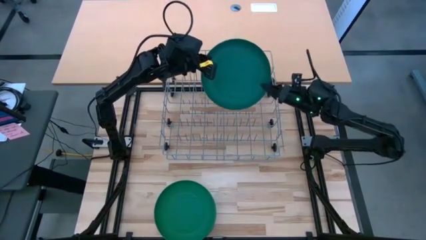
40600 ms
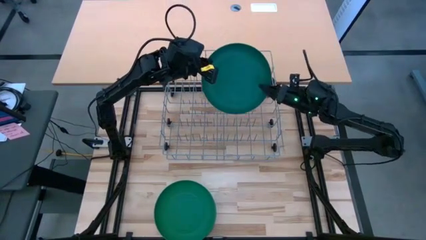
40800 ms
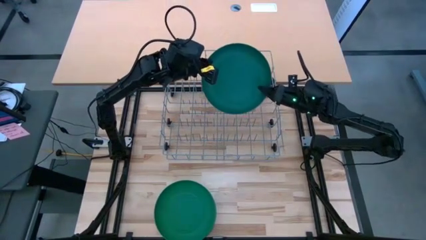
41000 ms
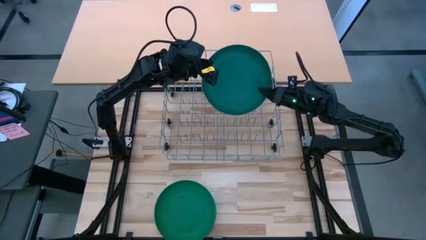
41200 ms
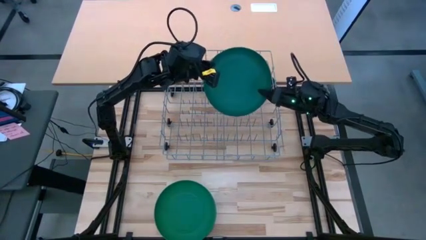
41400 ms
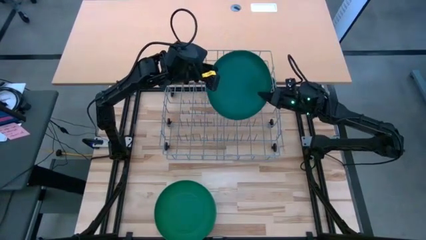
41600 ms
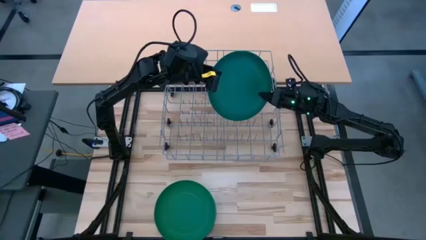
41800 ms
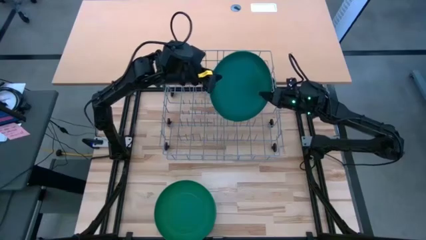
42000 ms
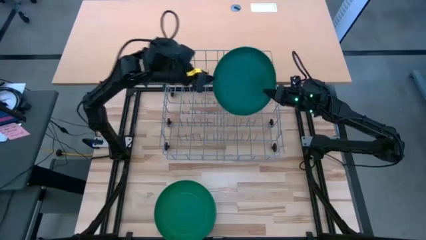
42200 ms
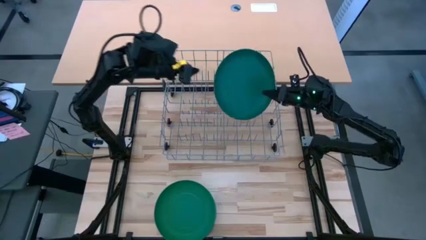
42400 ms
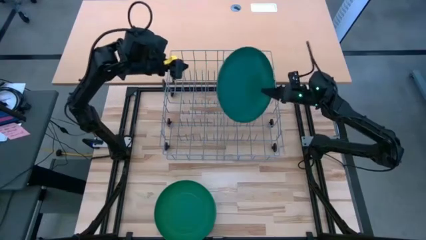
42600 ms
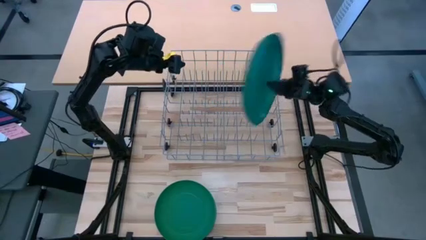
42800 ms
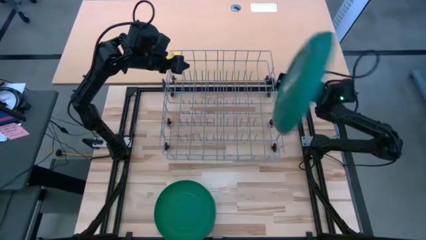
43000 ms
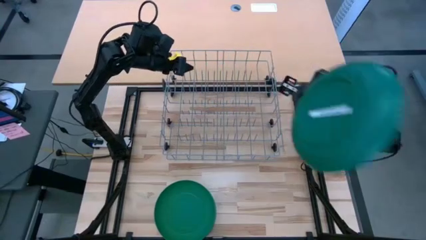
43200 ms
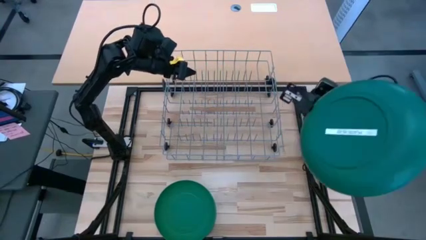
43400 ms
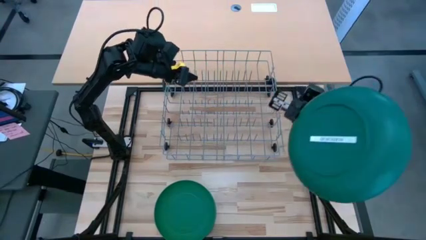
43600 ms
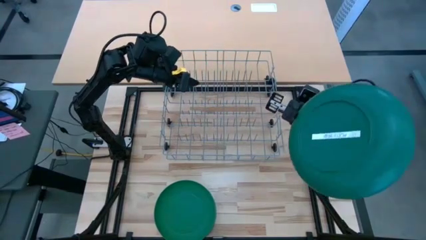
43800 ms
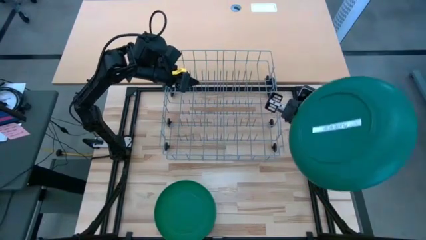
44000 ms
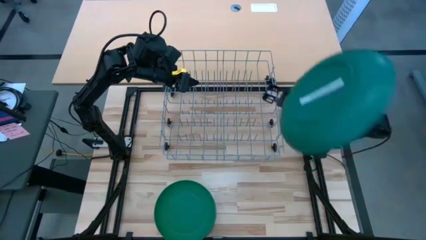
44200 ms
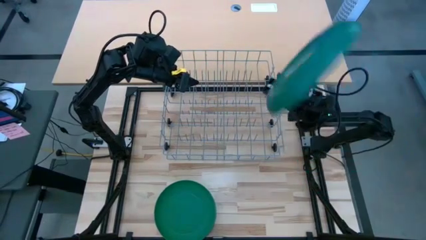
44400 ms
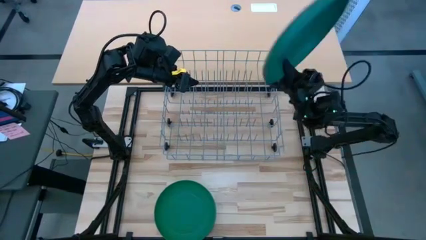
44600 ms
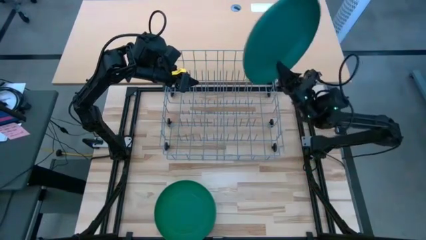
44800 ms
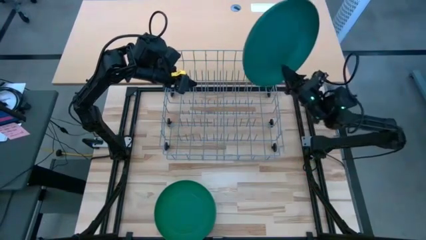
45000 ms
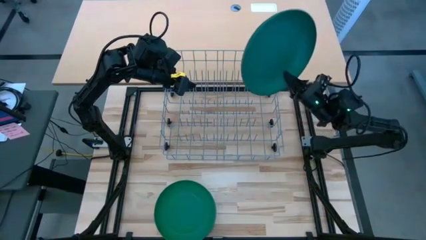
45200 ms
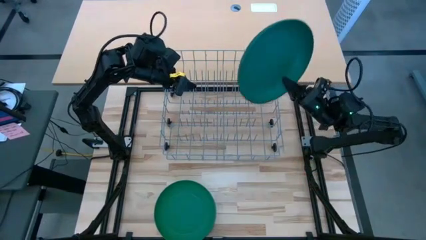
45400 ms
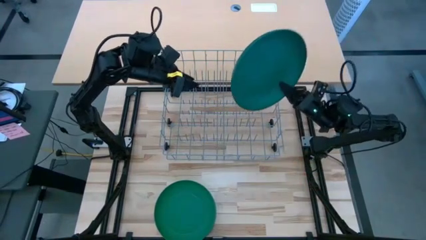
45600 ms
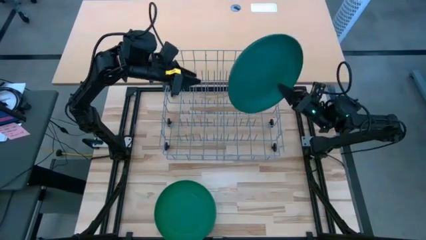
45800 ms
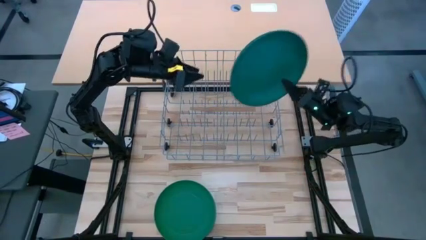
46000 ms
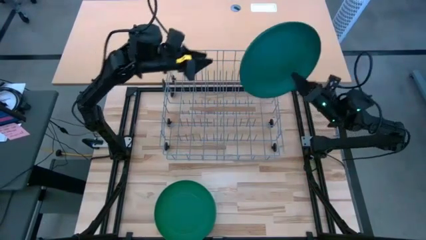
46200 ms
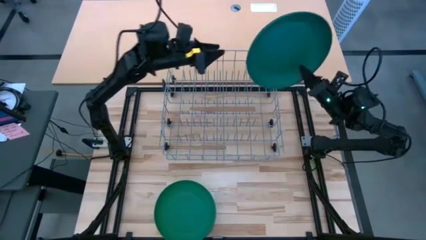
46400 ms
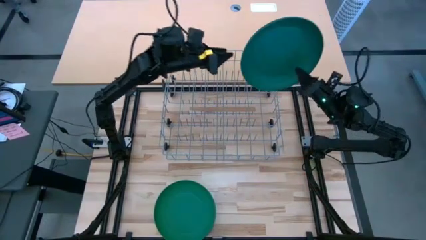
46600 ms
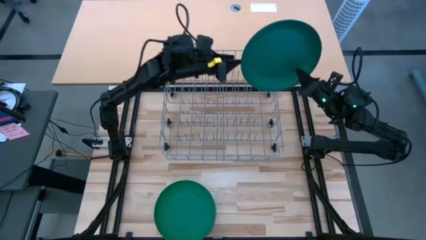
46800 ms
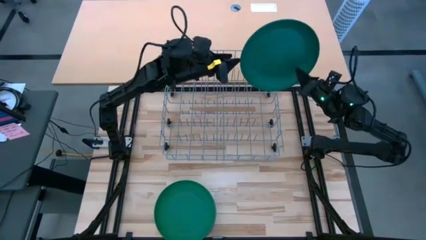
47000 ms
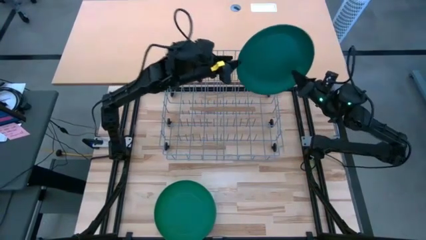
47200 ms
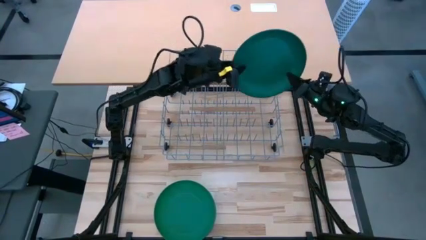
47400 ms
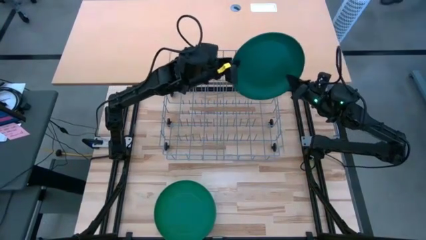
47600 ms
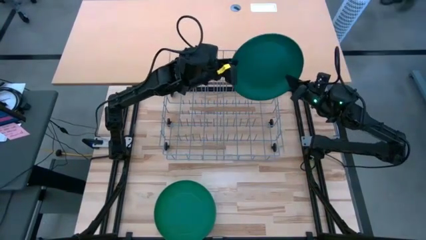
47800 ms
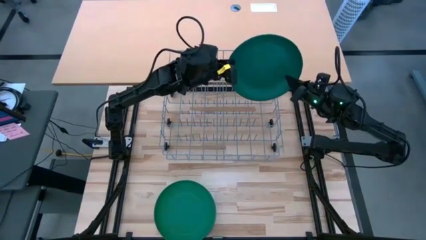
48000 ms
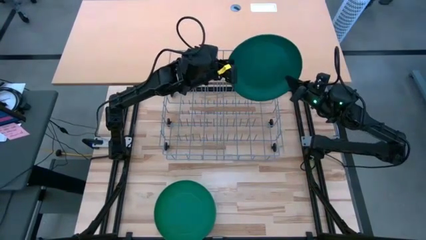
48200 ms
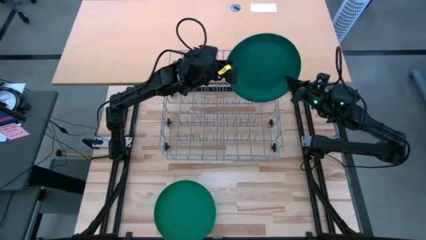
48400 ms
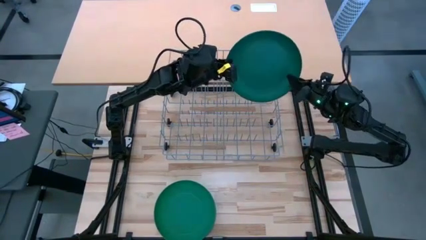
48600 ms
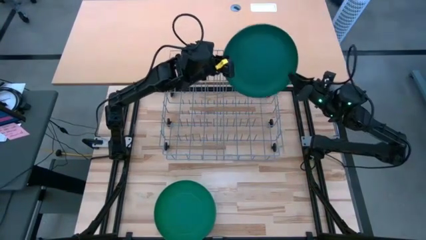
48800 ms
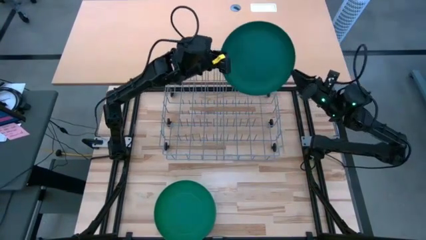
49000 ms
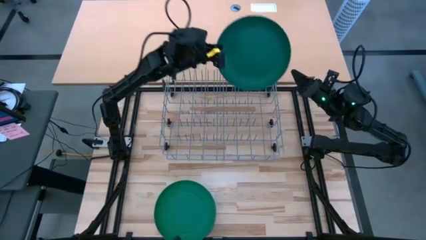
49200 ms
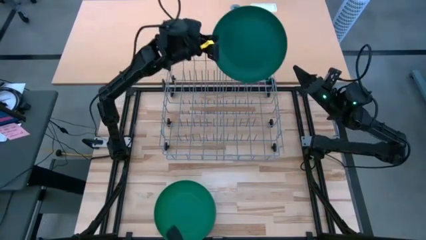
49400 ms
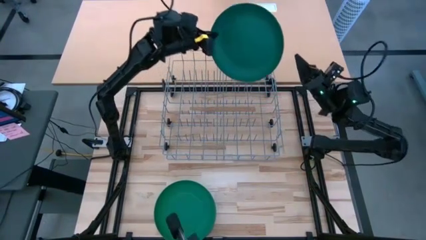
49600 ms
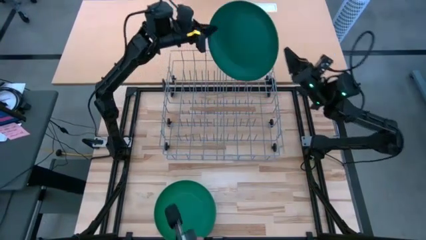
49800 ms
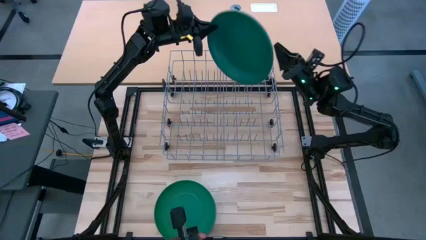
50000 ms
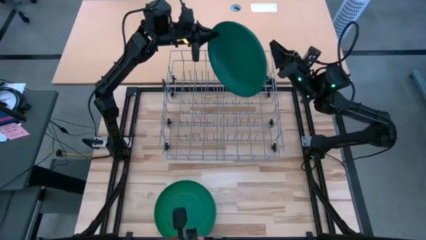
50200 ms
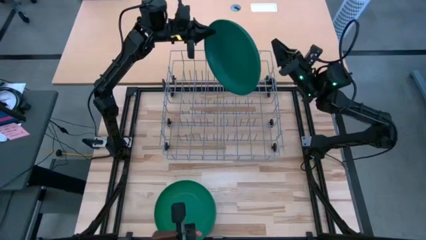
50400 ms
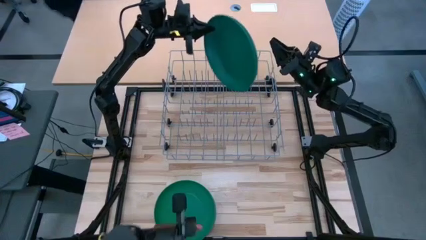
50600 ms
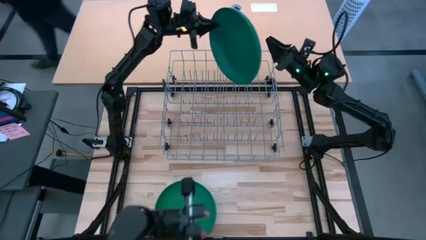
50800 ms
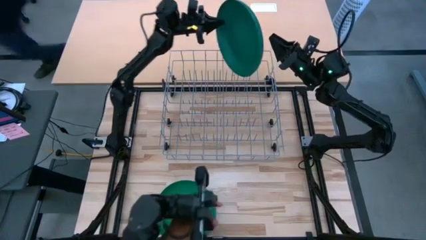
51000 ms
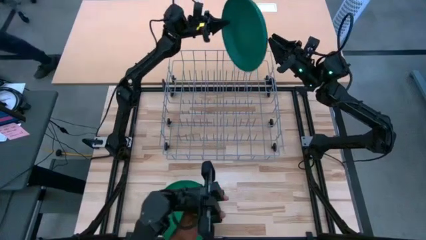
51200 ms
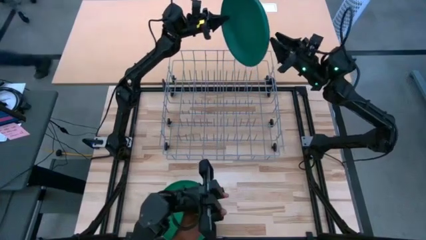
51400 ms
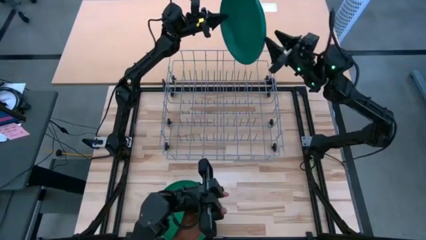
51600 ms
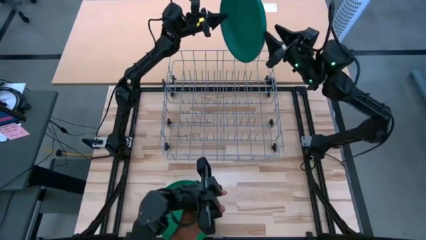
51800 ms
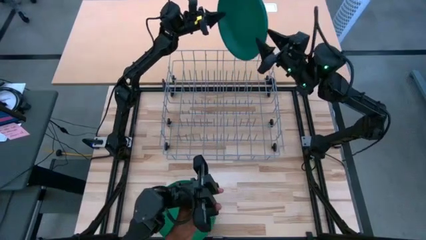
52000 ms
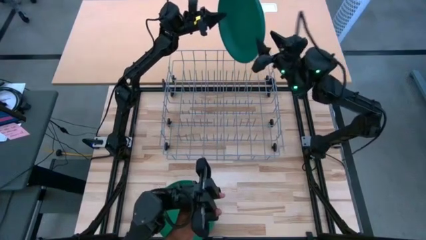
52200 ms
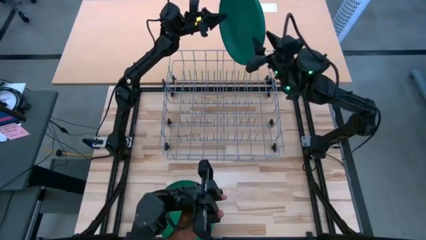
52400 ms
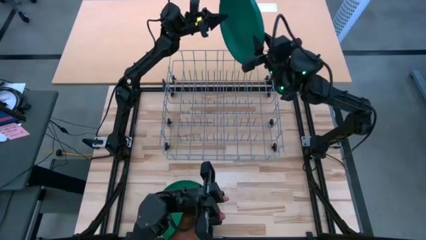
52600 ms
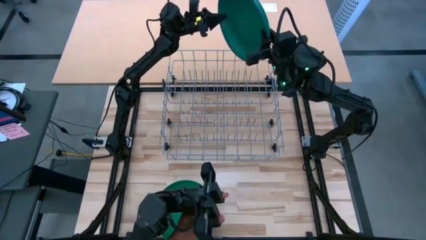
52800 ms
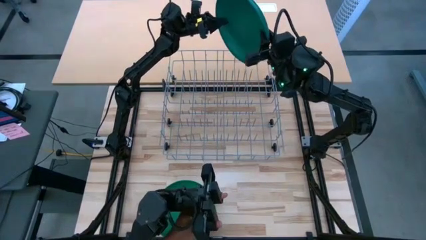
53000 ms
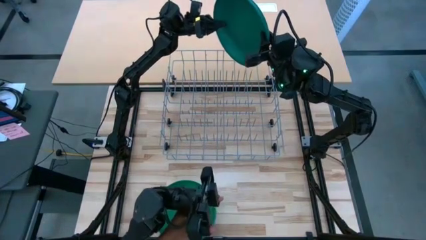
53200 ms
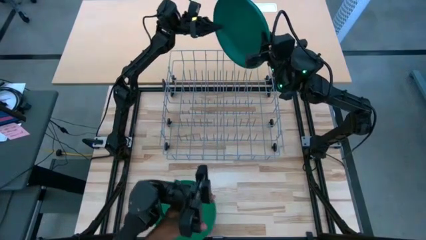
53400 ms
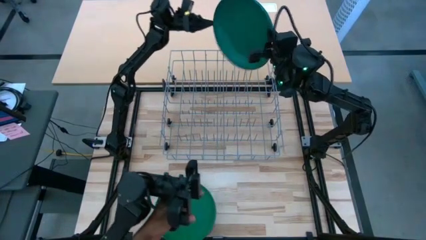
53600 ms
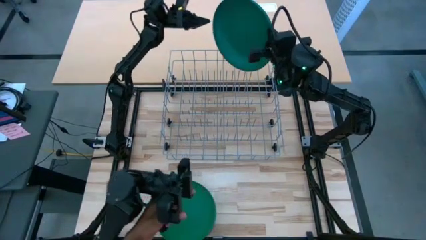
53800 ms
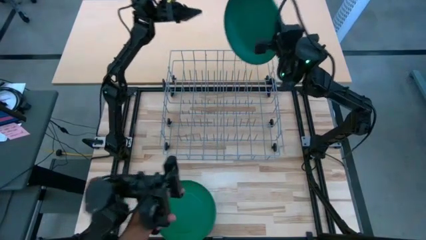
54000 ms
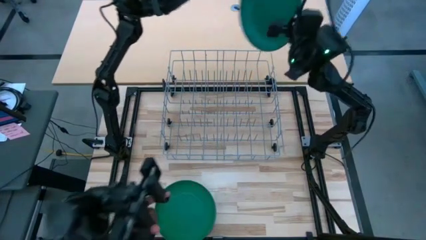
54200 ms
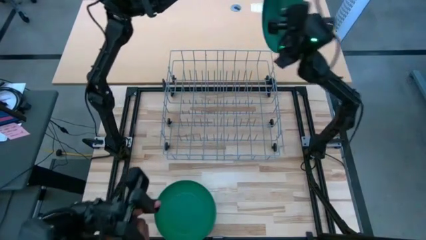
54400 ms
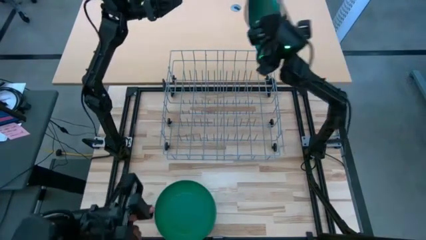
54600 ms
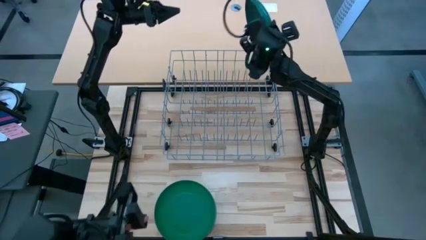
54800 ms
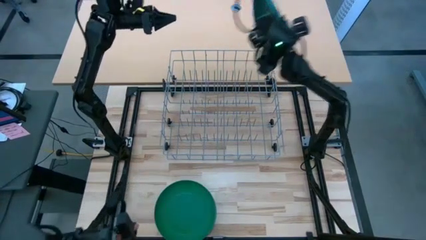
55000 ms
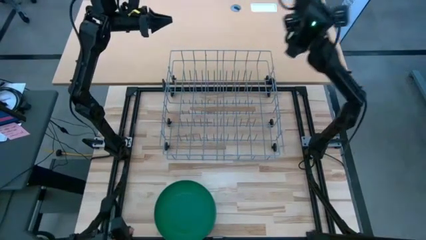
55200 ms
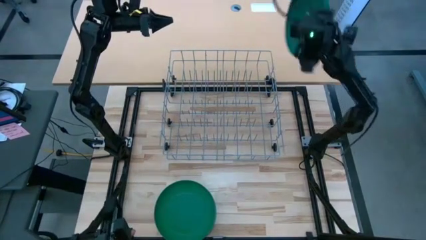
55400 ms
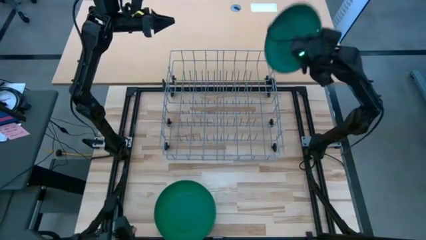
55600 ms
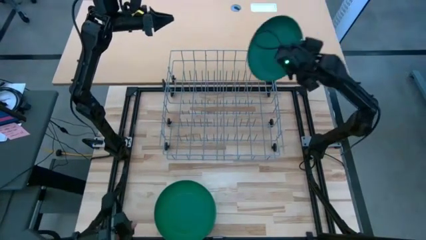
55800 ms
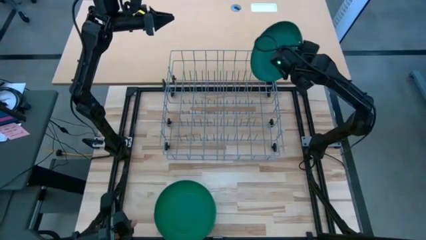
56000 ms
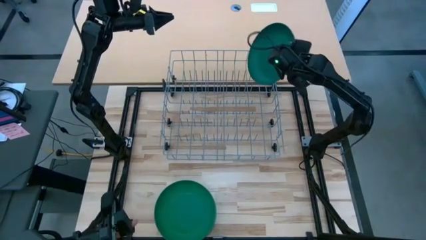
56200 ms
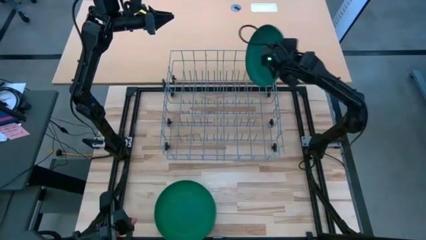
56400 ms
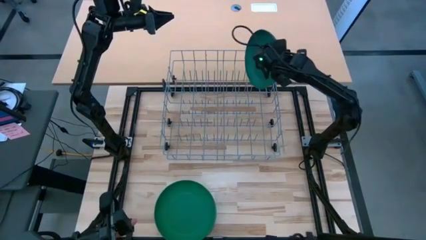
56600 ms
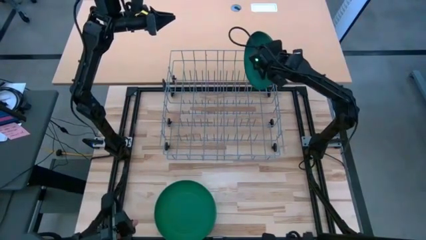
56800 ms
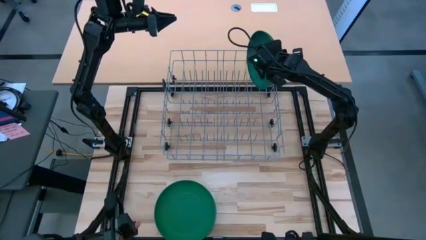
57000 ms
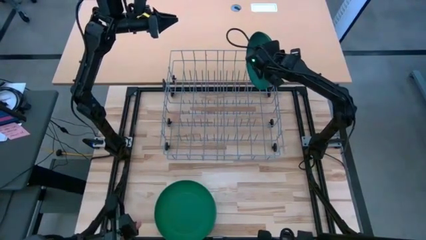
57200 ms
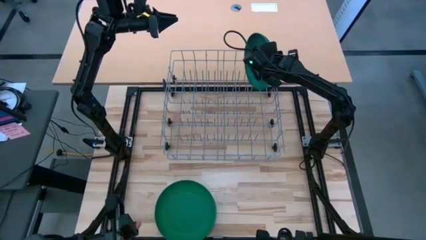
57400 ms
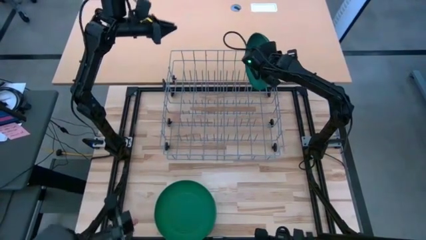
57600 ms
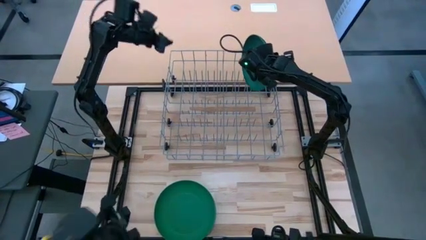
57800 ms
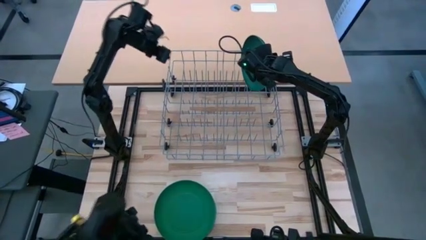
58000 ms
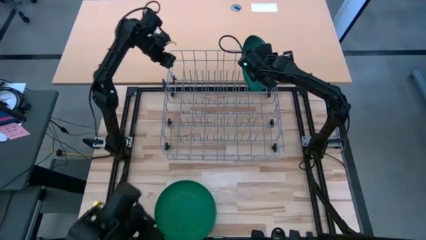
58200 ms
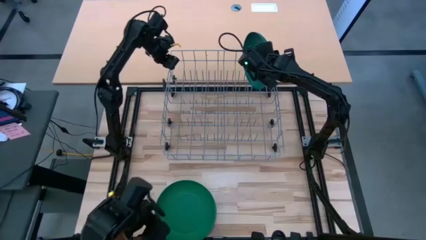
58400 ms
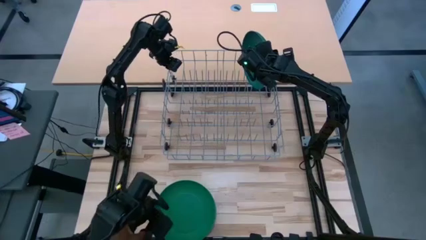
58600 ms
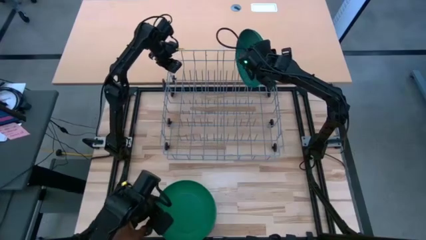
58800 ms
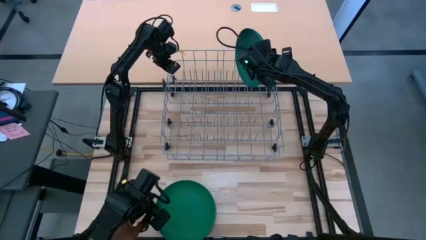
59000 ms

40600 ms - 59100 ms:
Task: Sort dishes
Put the dark blue plate in the dish rack
